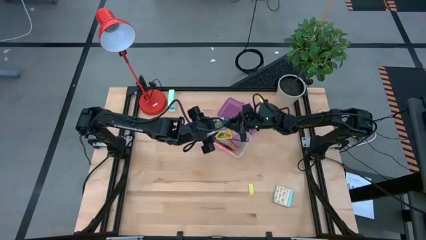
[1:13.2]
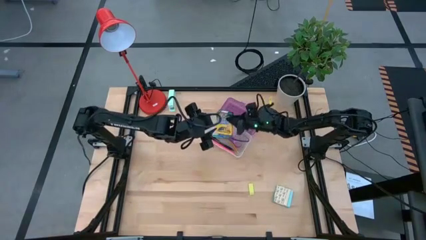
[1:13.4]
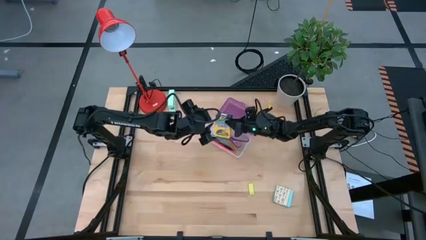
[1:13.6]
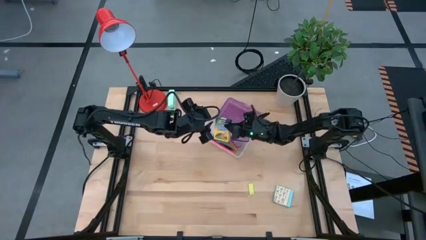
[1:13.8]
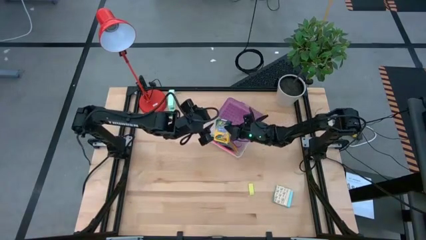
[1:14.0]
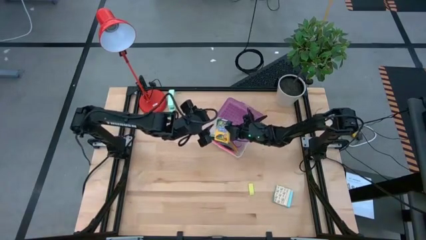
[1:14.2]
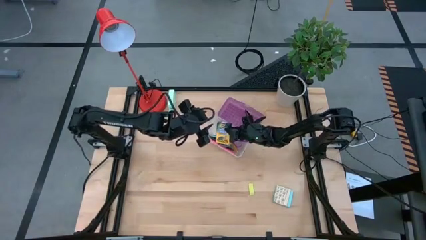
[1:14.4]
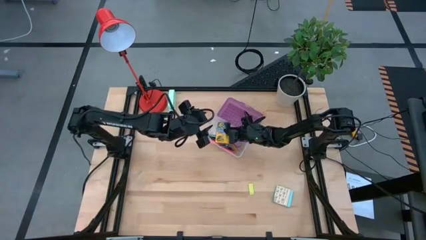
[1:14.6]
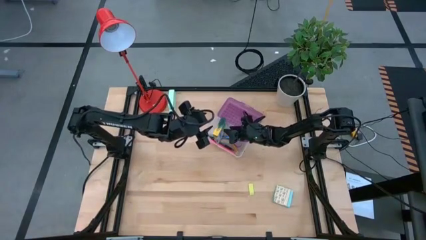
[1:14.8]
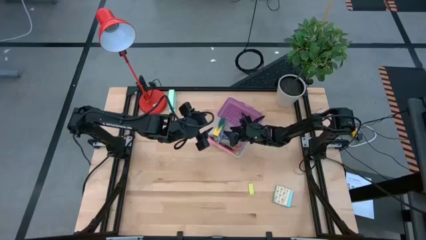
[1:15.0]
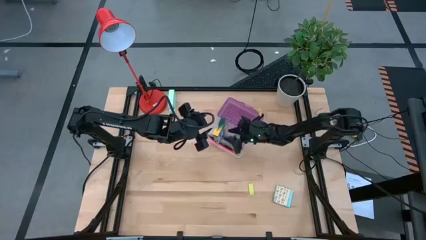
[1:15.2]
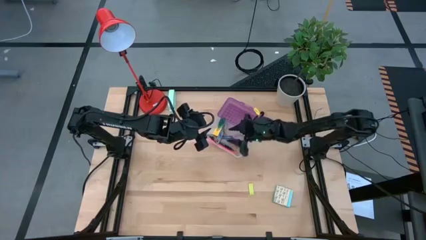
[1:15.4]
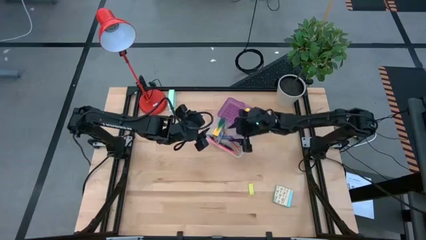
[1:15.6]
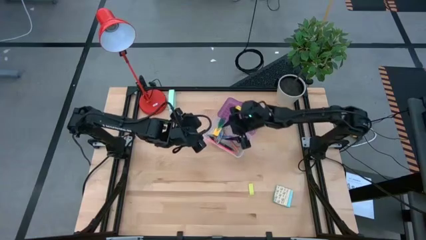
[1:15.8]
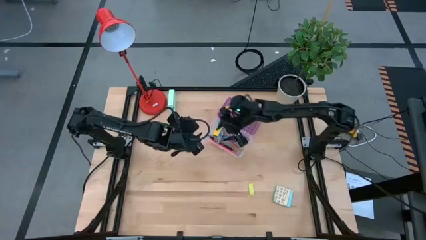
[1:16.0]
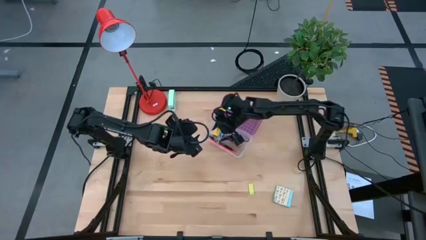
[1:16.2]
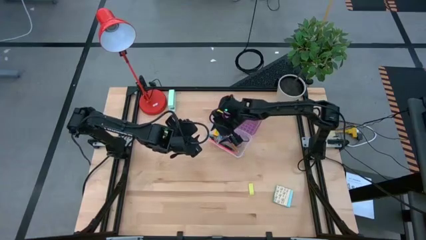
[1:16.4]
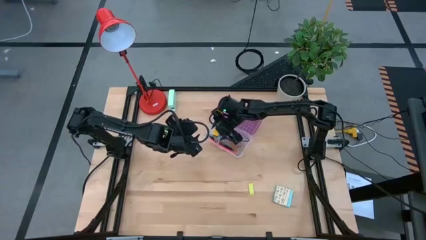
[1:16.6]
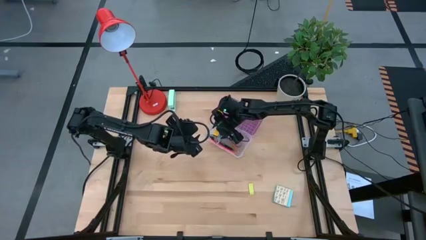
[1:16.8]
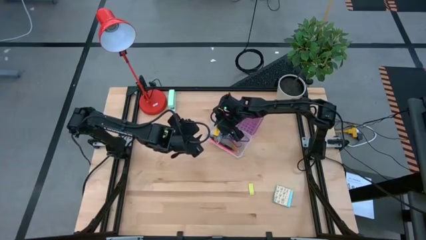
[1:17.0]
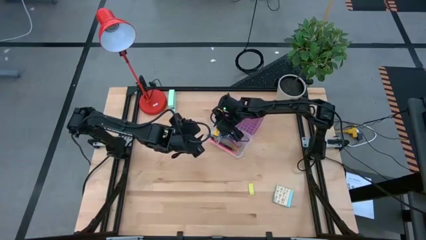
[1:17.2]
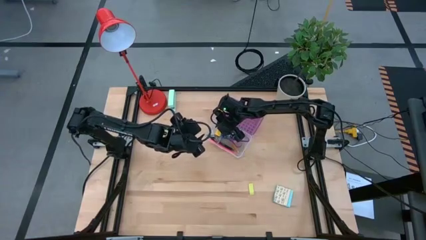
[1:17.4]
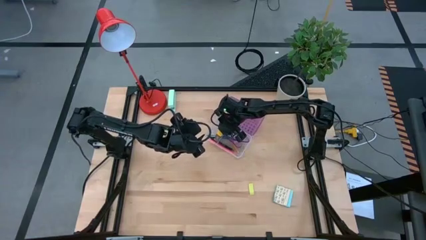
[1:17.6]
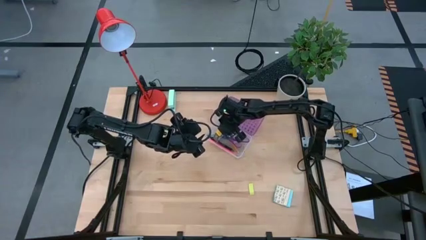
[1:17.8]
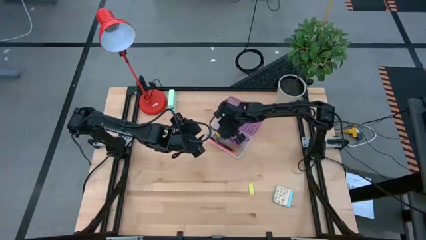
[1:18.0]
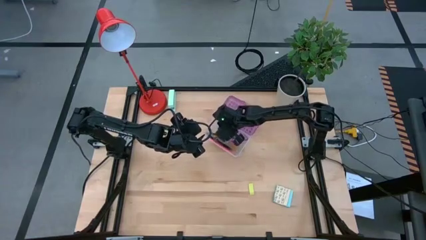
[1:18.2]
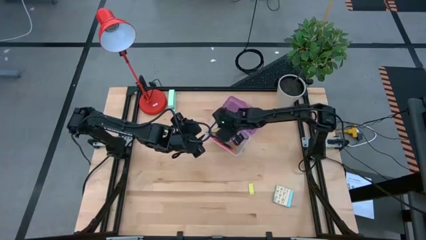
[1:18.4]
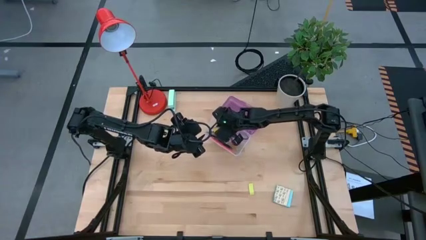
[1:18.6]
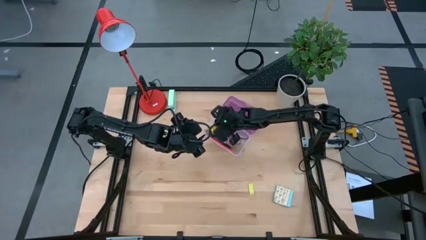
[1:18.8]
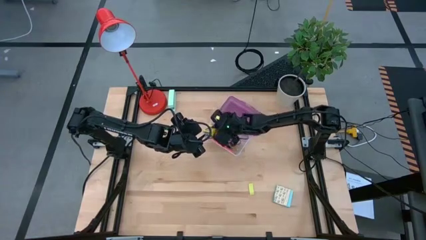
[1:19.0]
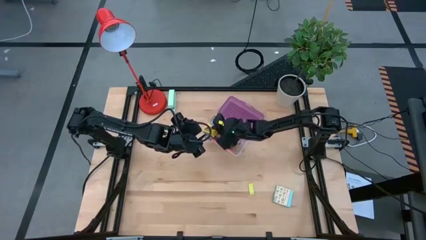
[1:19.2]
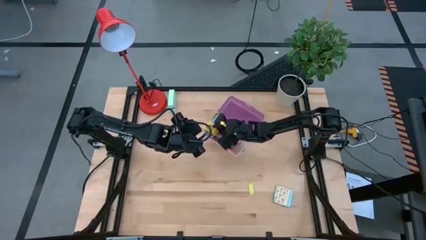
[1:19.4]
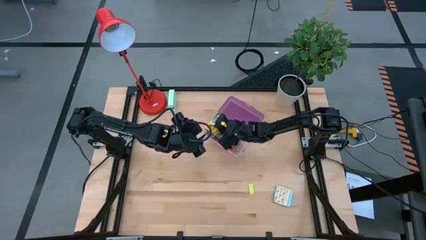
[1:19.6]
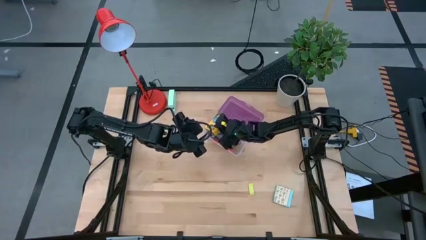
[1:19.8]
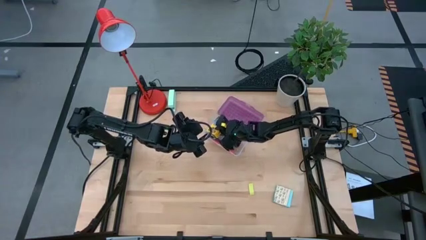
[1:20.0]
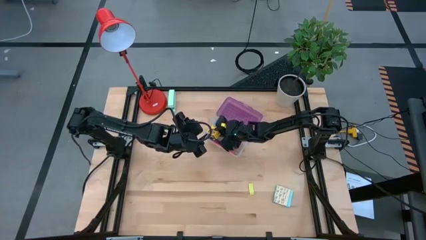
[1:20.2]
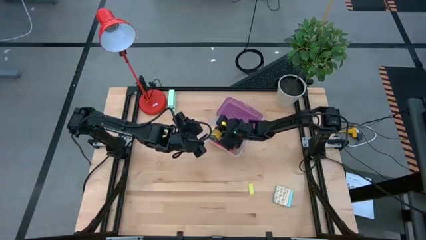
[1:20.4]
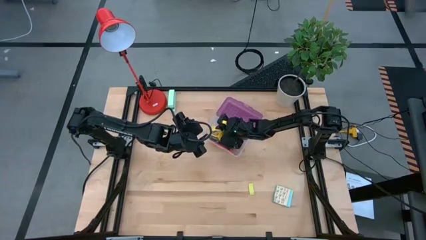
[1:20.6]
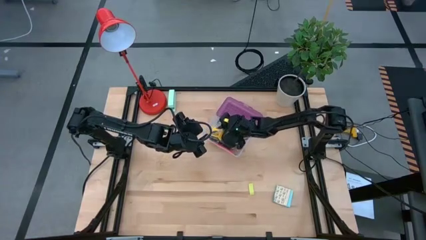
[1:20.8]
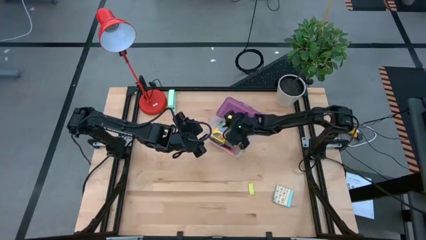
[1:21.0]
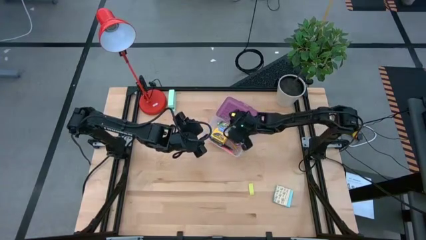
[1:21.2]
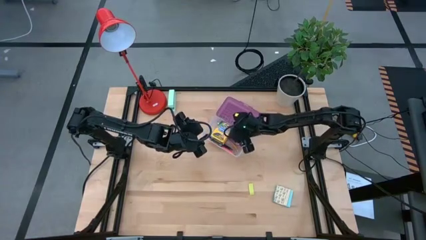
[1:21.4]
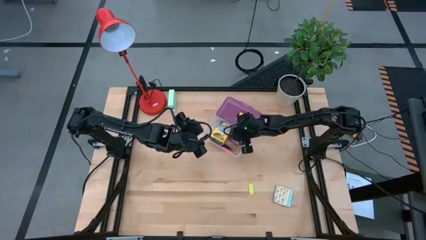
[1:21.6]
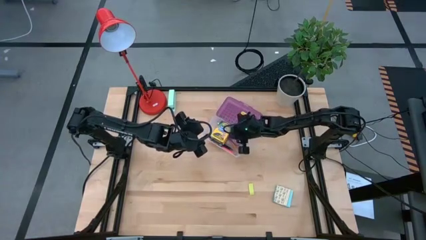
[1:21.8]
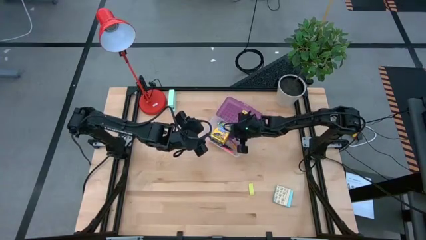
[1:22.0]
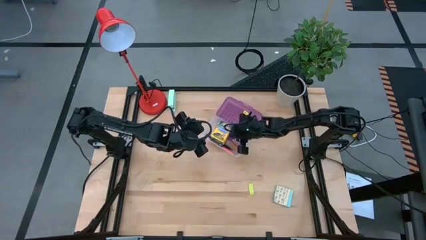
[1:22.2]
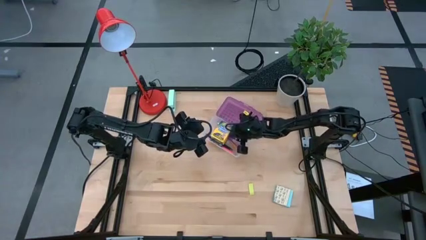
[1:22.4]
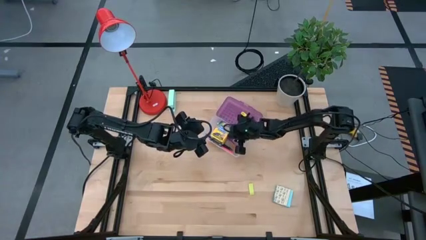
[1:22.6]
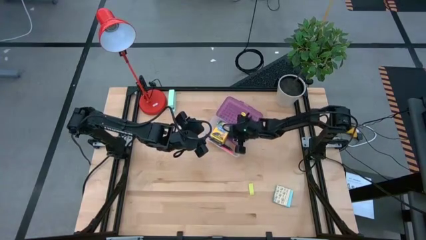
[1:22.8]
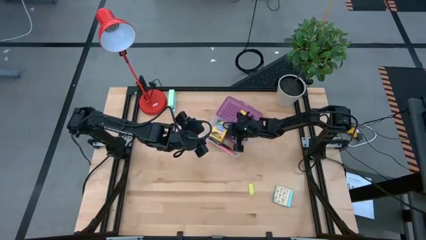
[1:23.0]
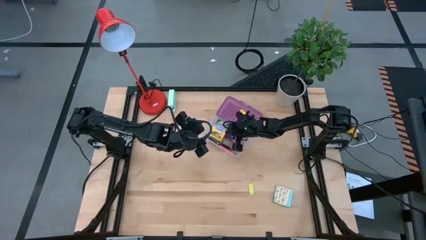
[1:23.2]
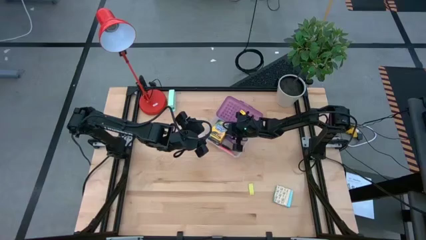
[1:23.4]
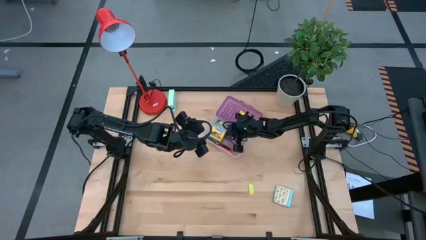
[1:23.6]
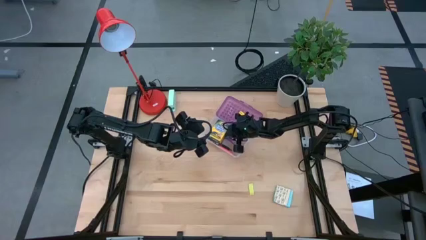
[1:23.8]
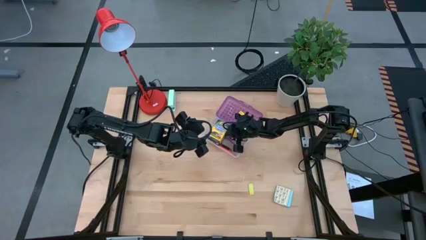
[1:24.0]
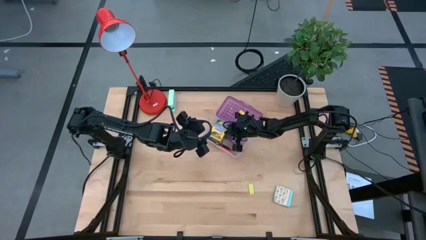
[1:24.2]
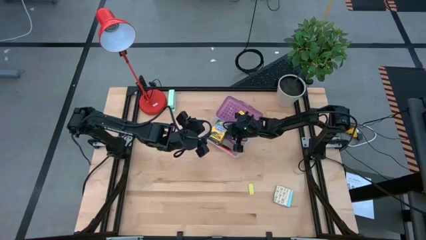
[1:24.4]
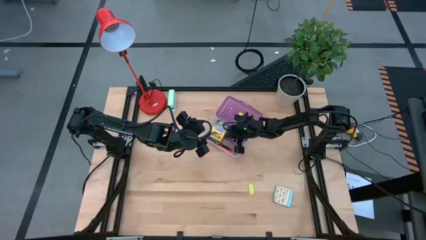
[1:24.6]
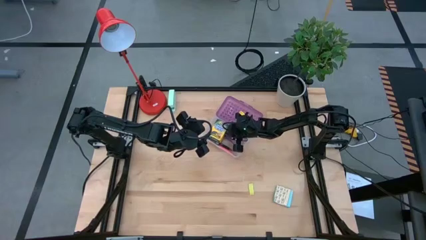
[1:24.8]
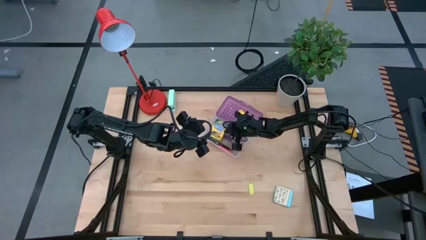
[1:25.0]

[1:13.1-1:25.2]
Task: Pack school essentials
Put the yellow crayon box into the purple supply box
